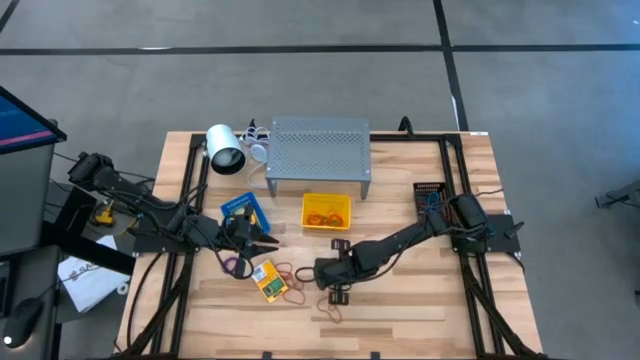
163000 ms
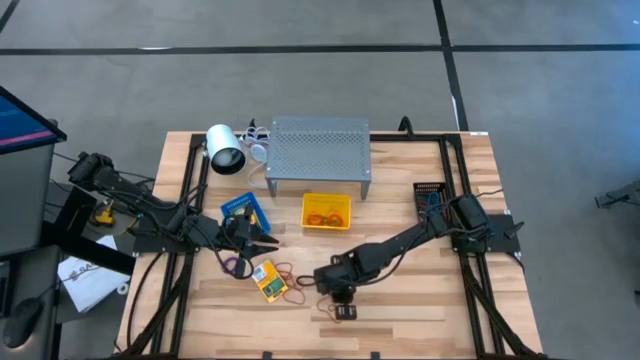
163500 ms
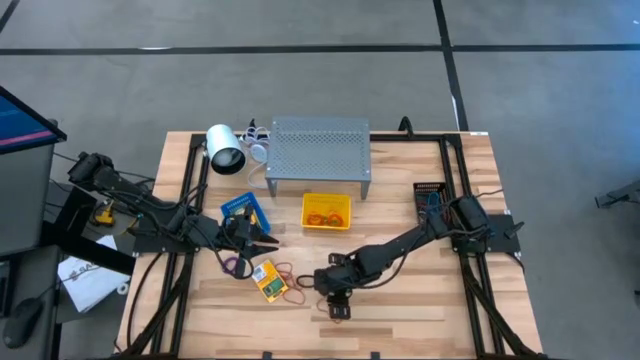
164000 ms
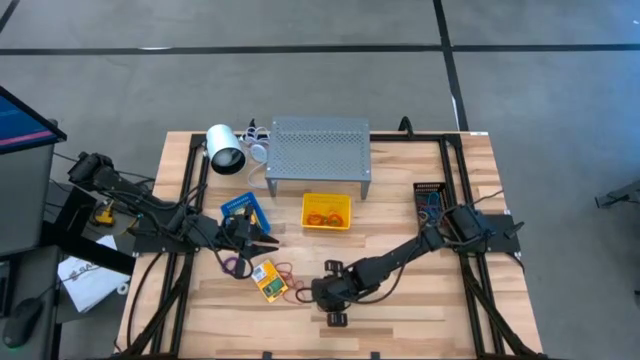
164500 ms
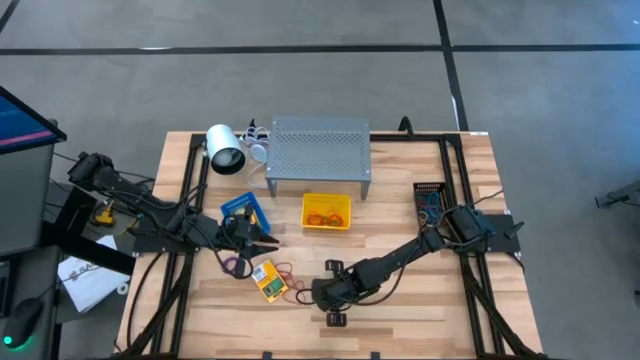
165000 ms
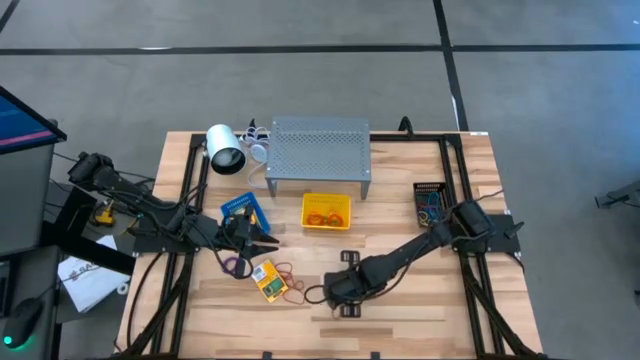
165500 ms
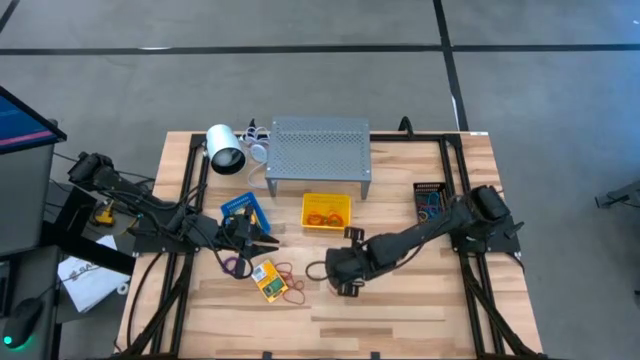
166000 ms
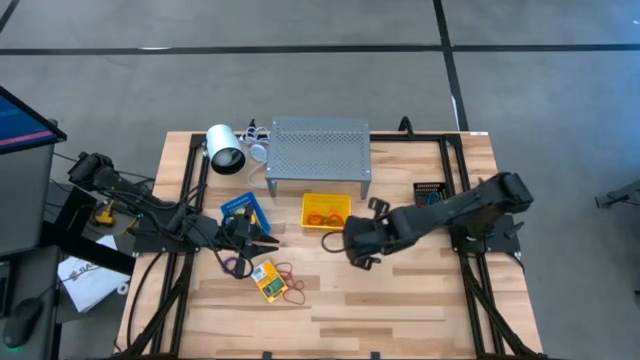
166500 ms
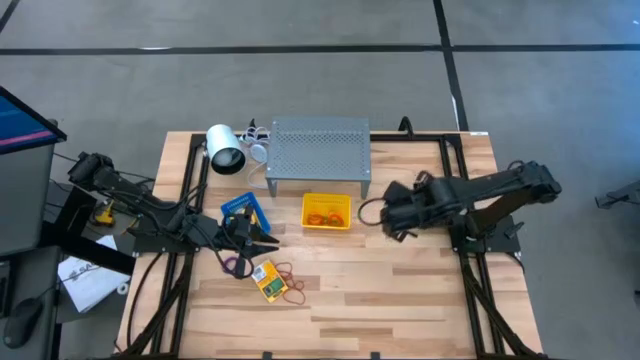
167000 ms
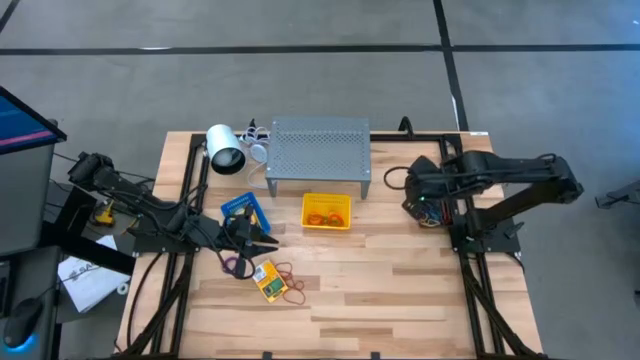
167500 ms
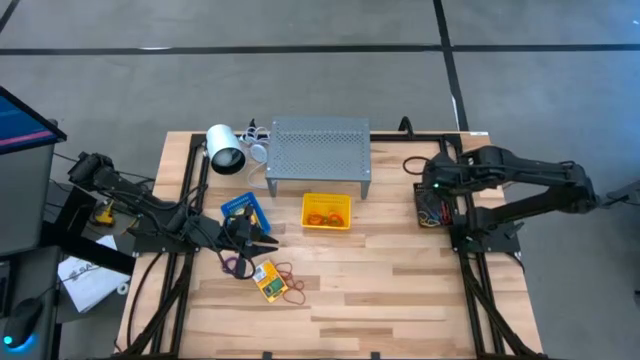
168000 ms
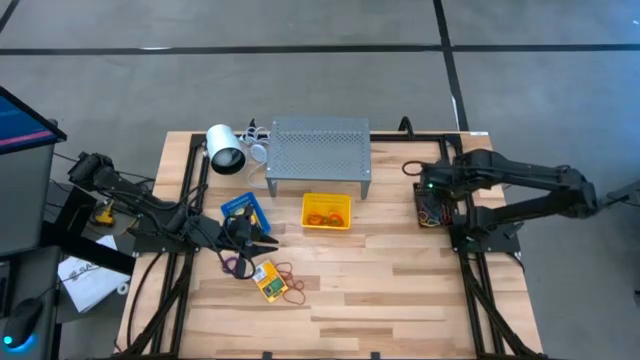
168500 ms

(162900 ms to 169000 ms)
Task: Pick & Place Office Desk Supplies
Put the red rubber band into the black bin

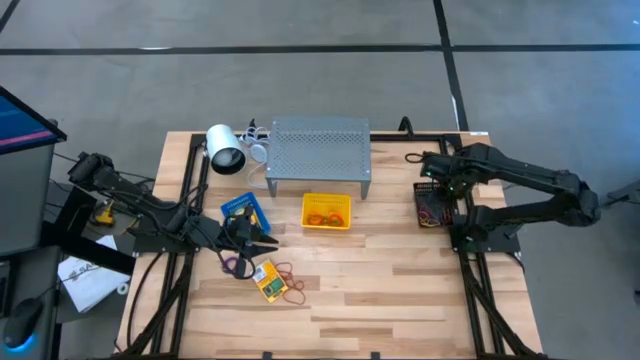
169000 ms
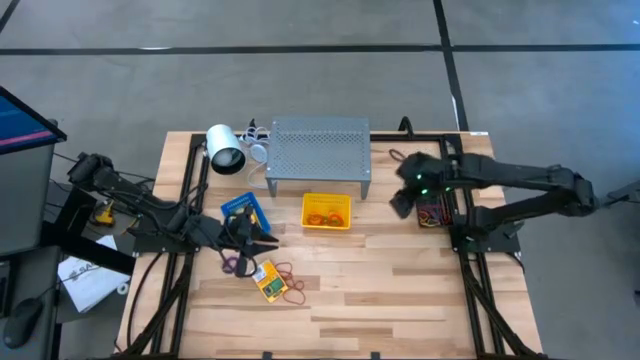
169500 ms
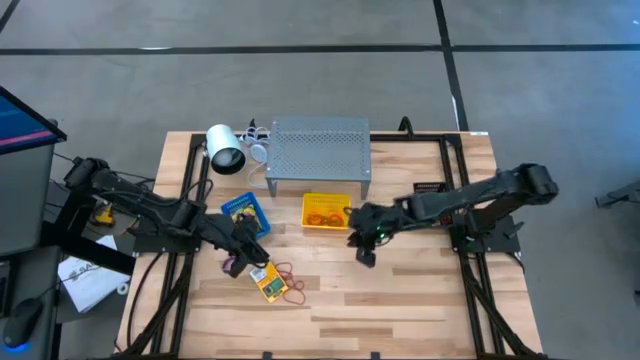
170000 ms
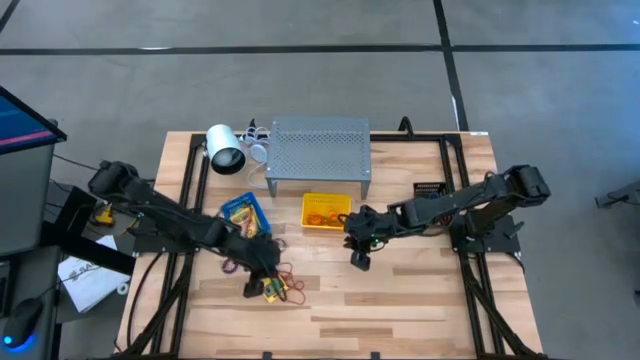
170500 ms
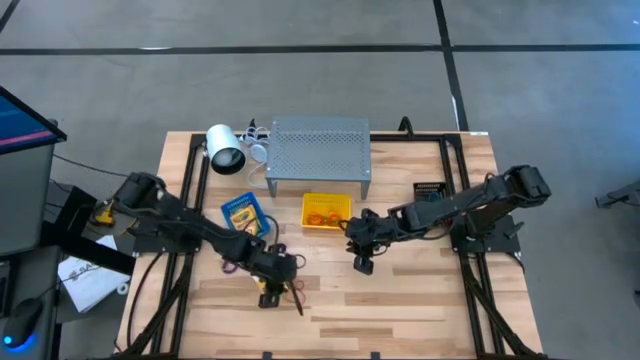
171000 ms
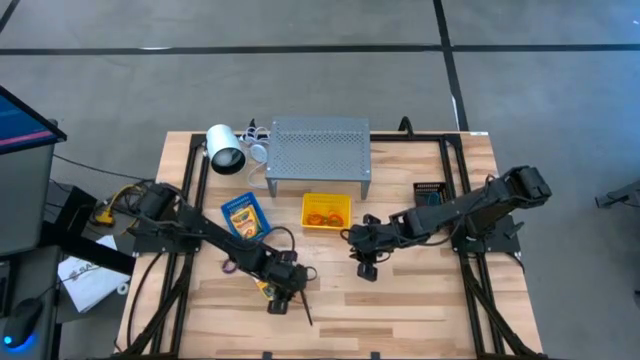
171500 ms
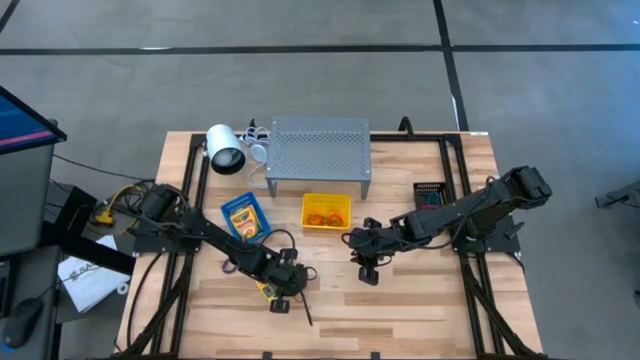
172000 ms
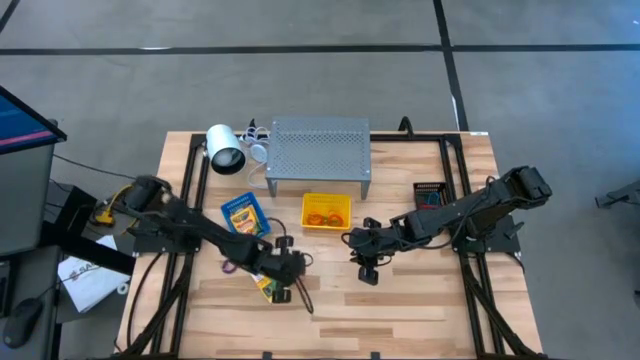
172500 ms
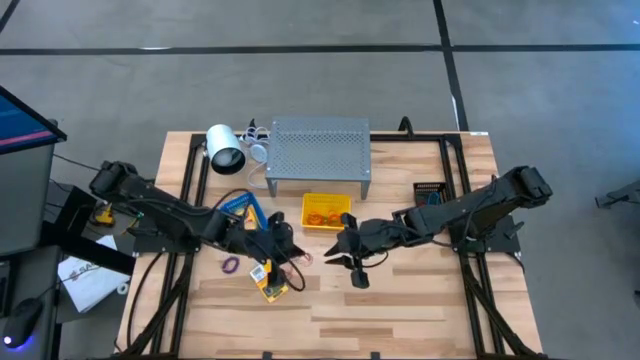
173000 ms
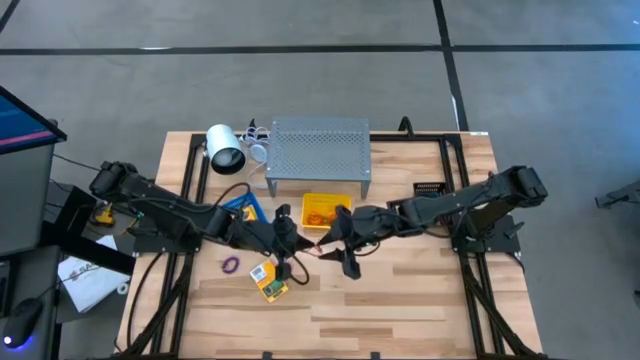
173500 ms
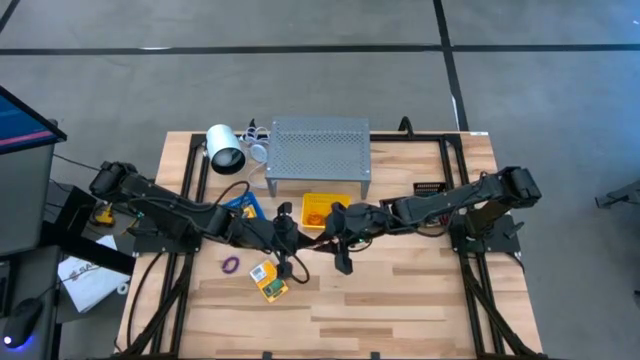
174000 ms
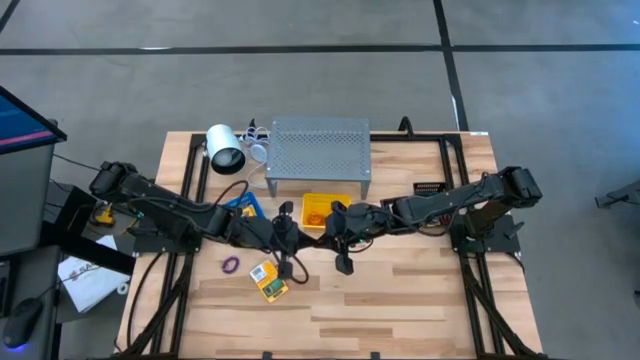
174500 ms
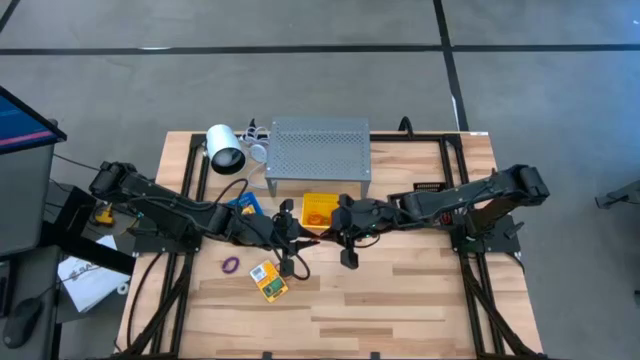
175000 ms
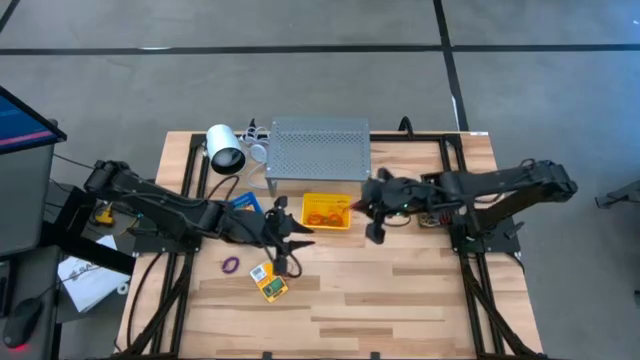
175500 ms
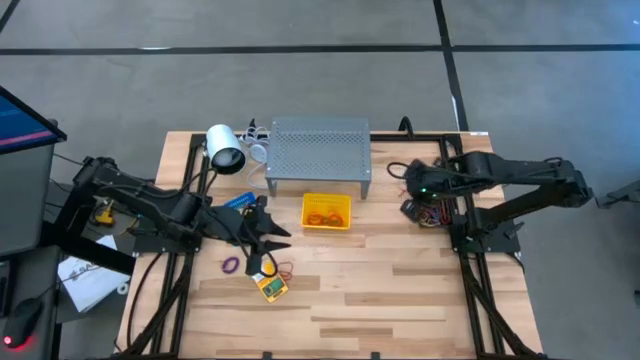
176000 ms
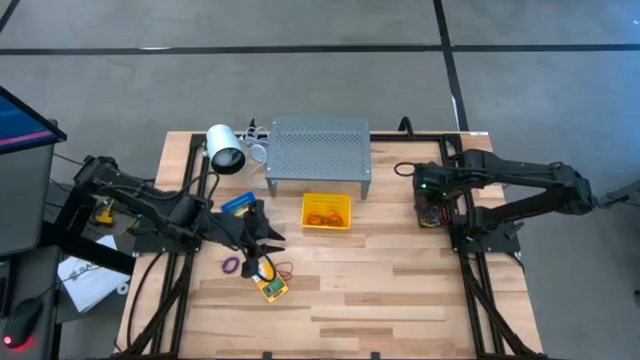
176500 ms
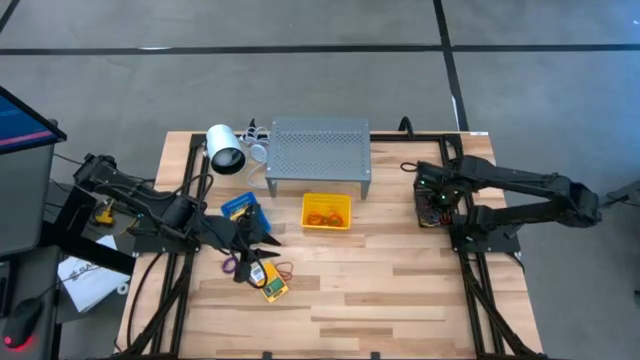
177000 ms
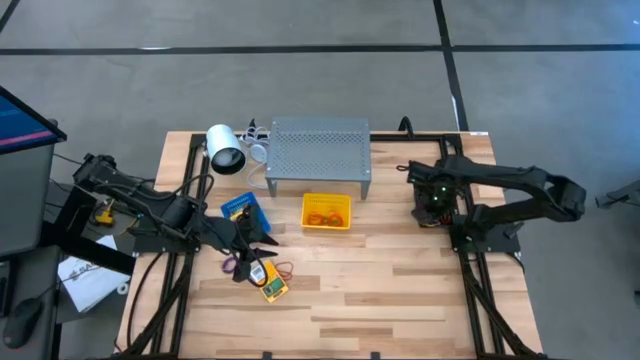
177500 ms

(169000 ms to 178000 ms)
Put the red rubber band into the black bin

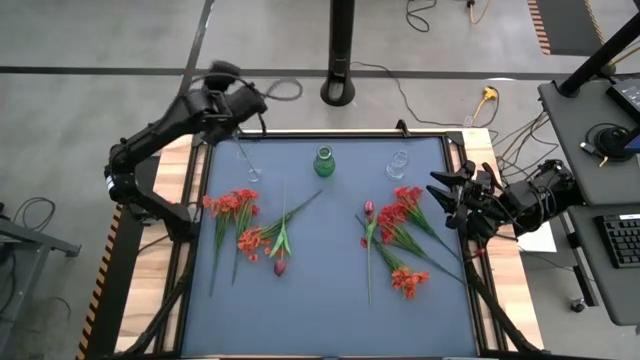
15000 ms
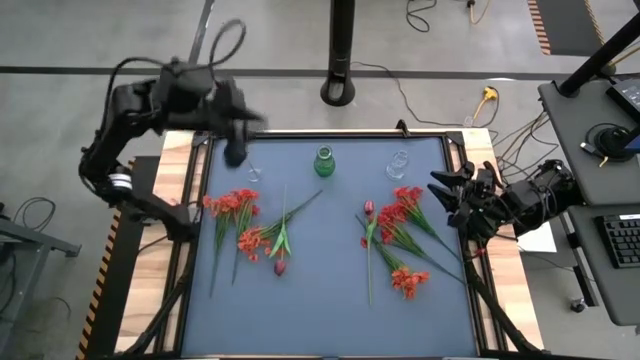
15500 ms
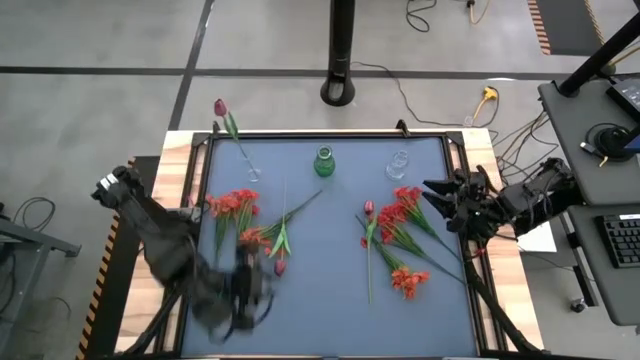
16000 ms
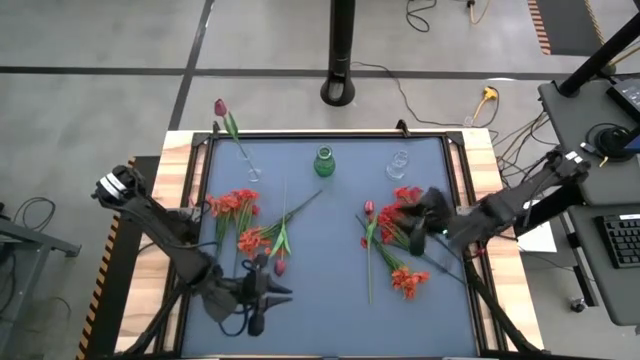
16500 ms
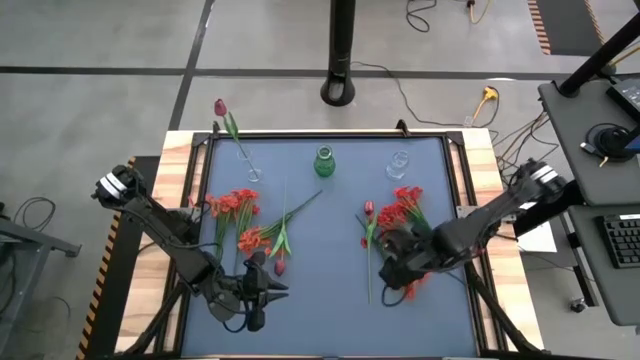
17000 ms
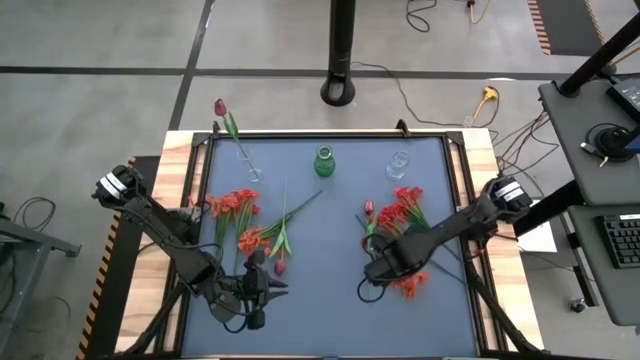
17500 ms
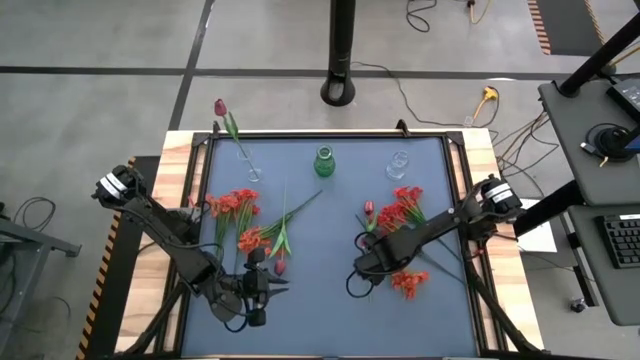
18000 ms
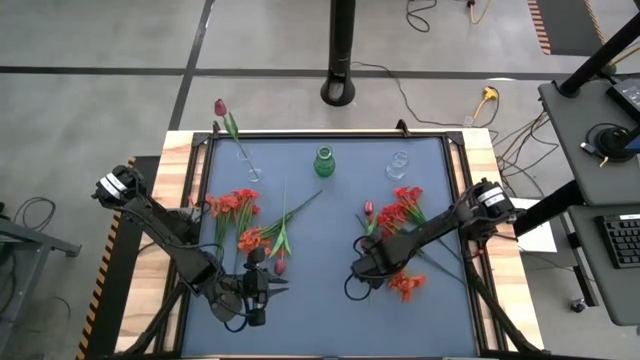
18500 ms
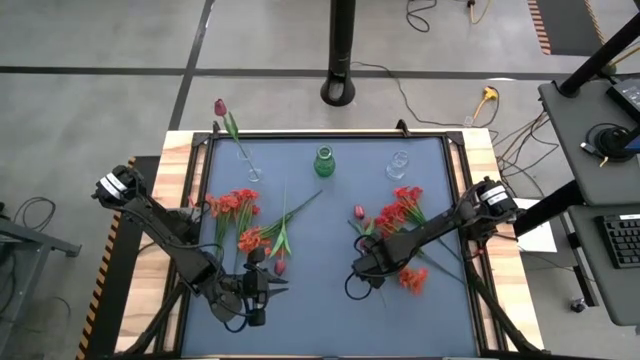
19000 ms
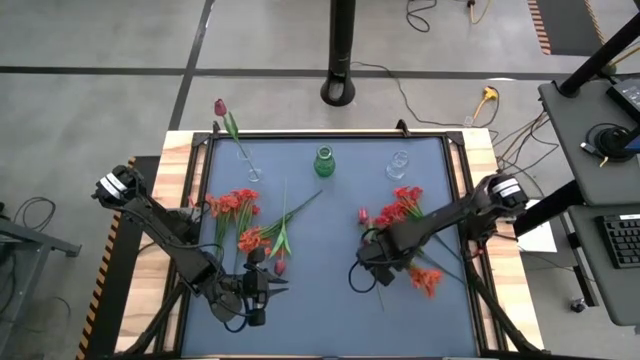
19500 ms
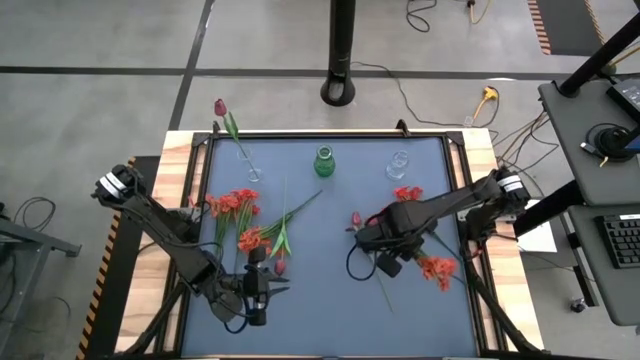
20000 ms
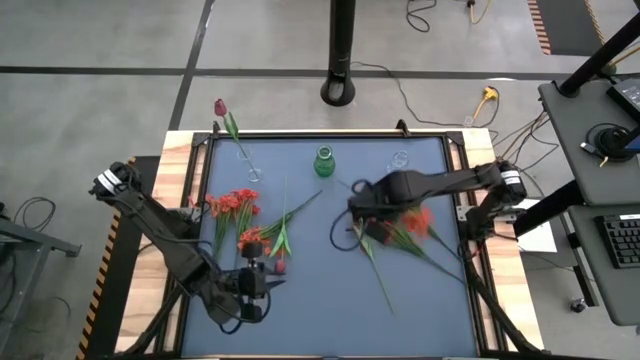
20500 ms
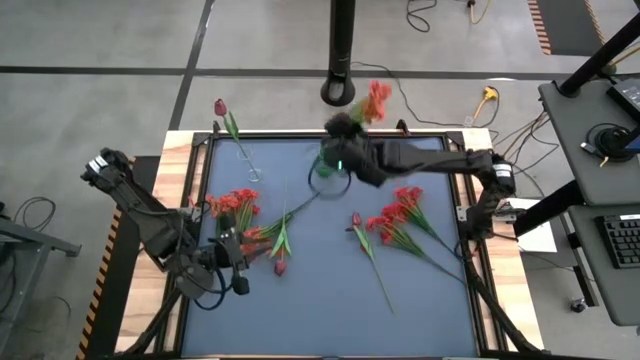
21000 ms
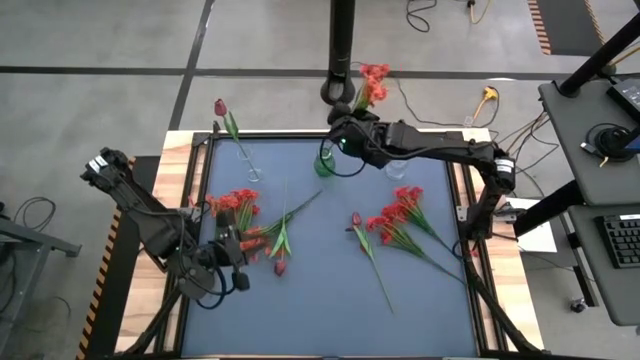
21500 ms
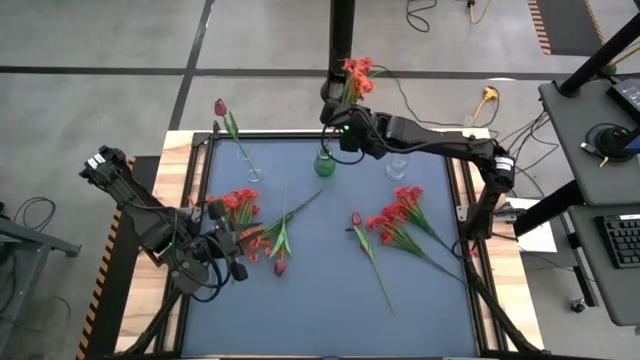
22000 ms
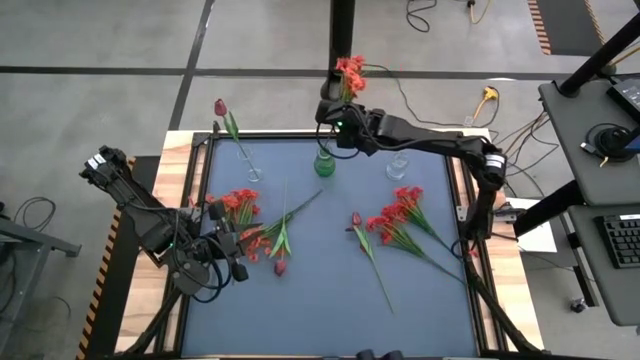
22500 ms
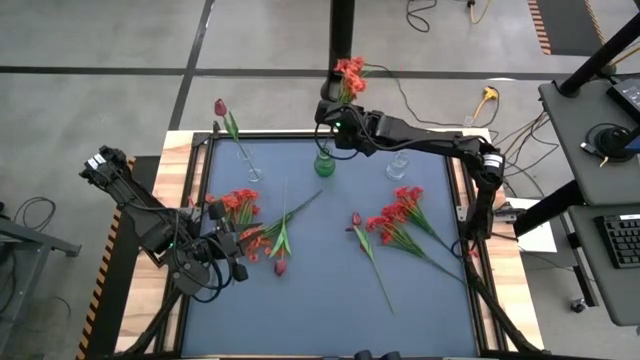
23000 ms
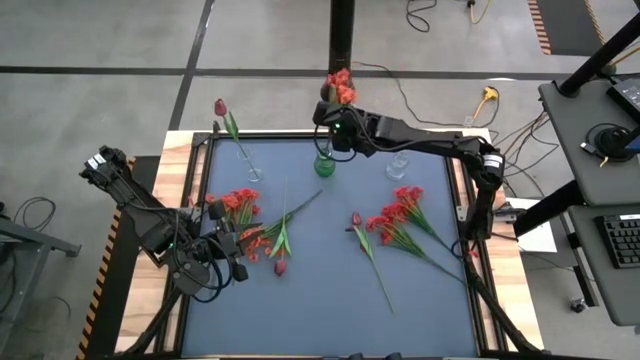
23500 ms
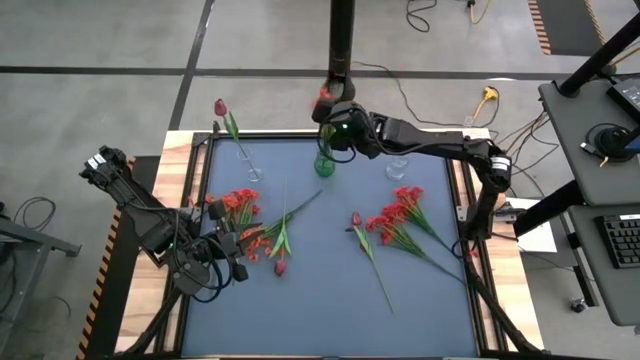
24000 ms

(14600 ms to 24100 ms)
Task: Sort flowers into vase by color
Put the right orange flowers into the green vase
